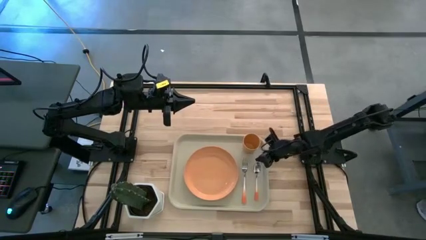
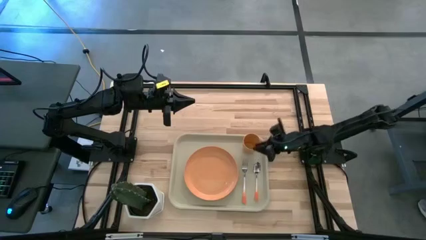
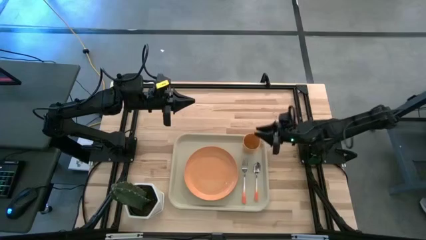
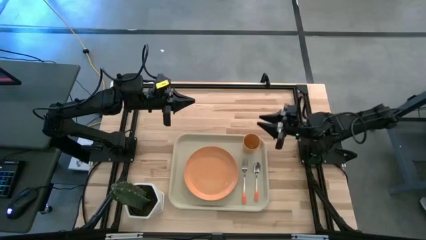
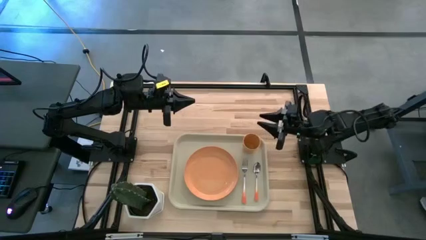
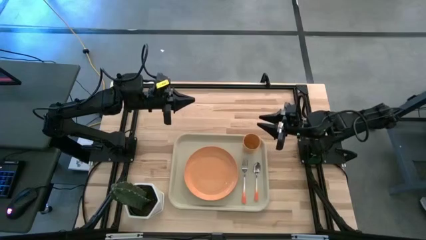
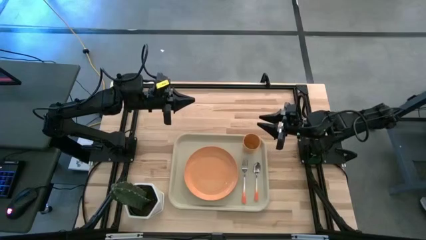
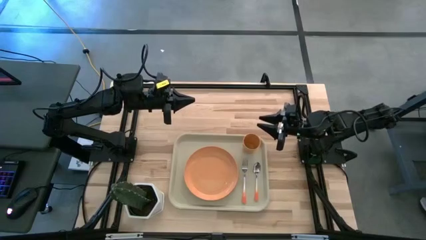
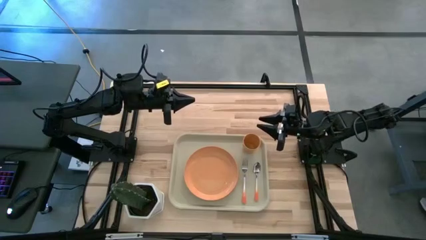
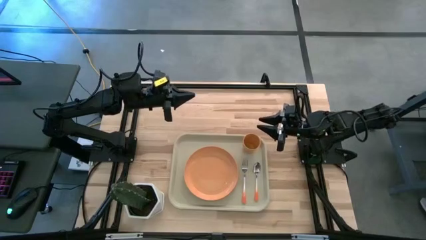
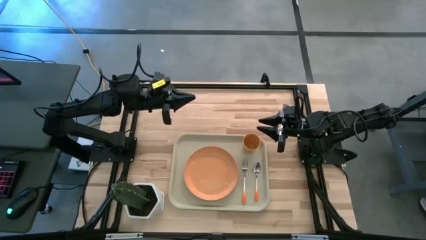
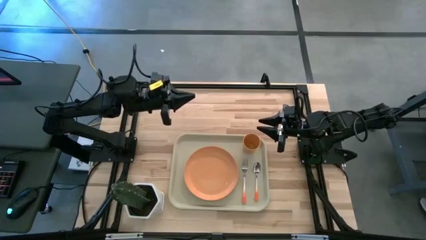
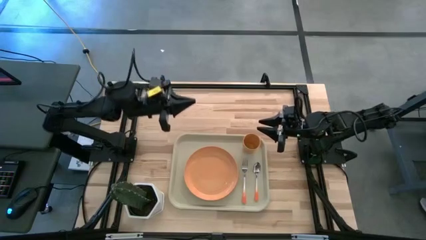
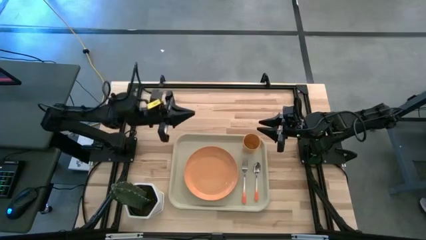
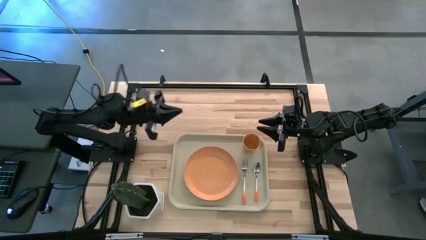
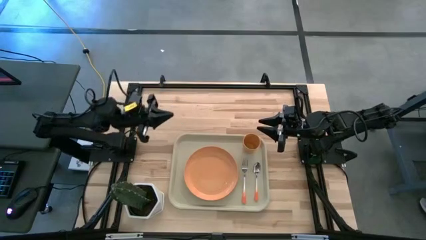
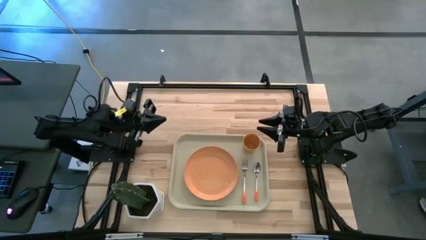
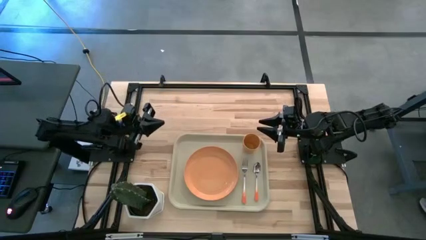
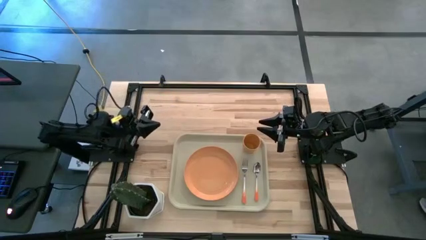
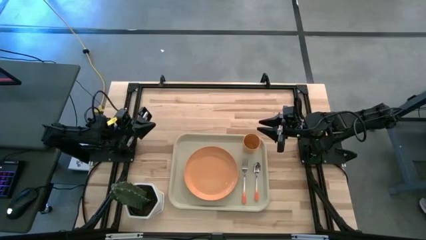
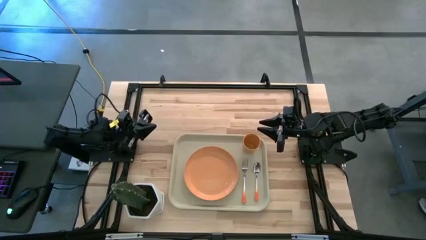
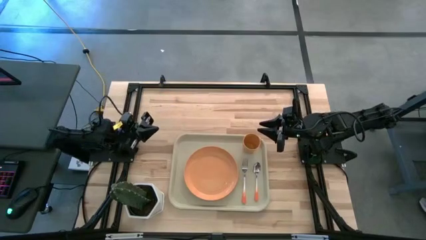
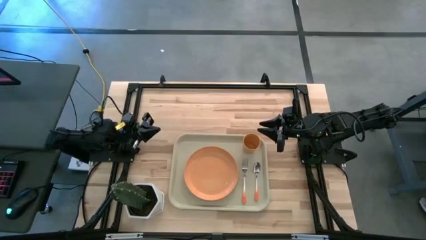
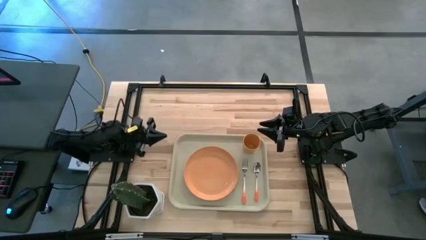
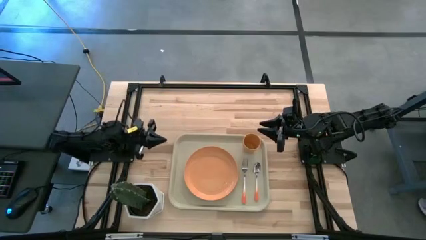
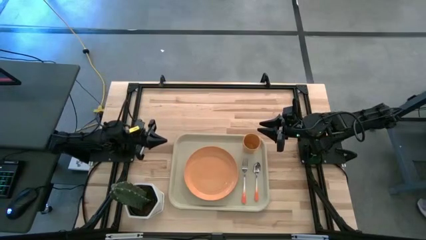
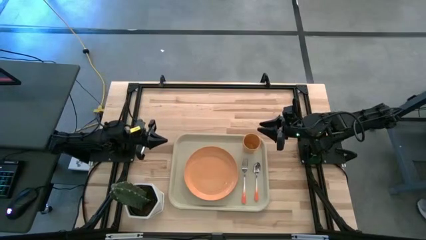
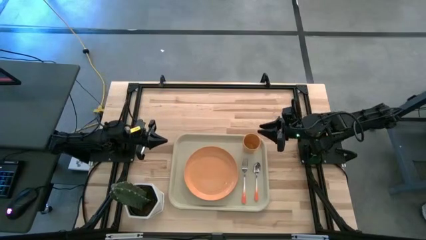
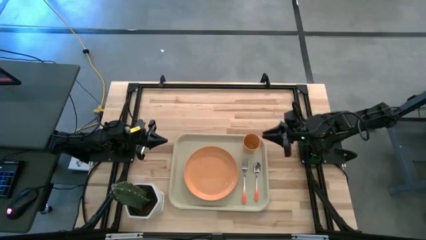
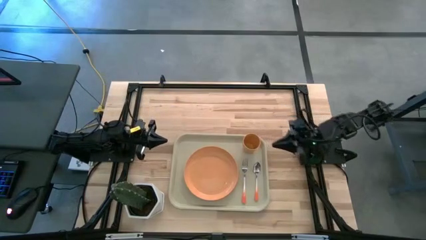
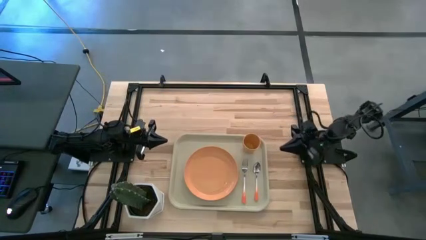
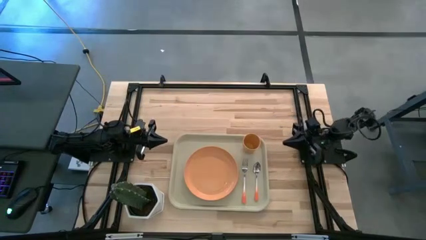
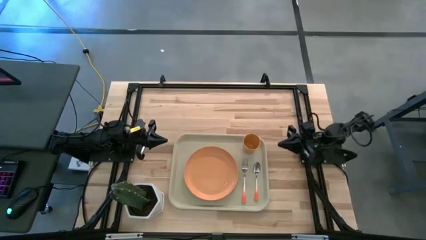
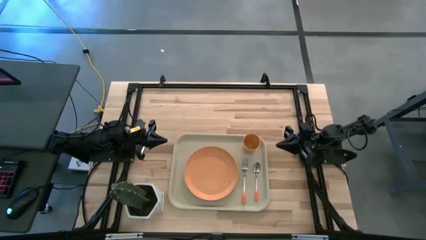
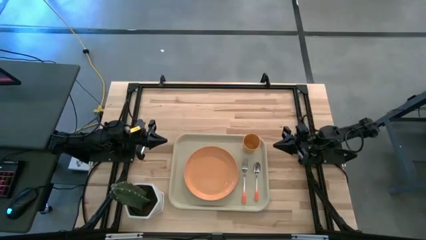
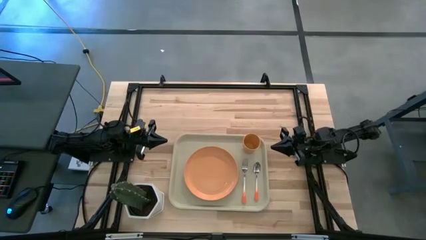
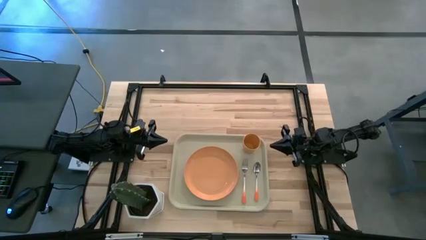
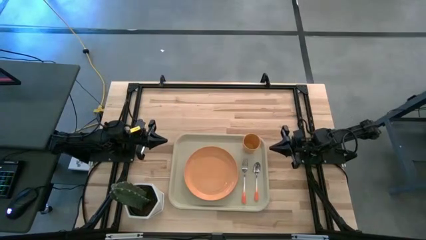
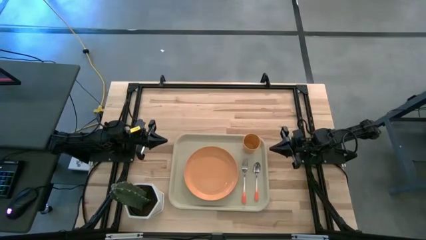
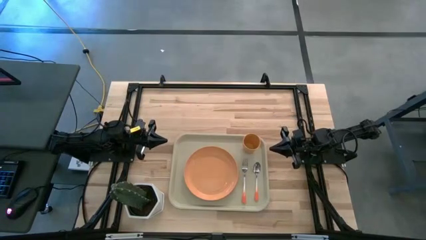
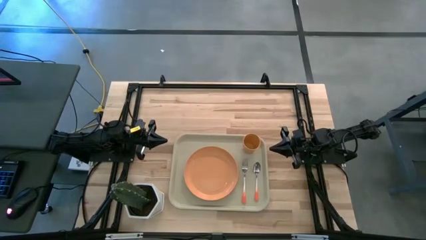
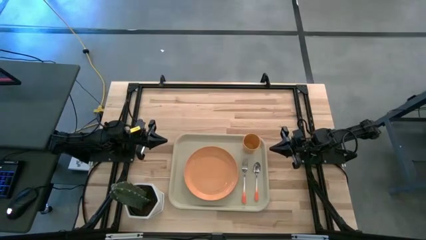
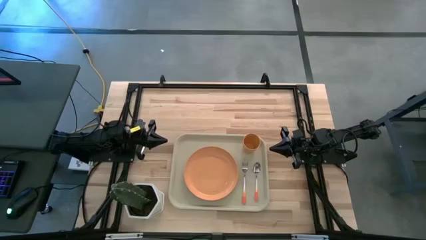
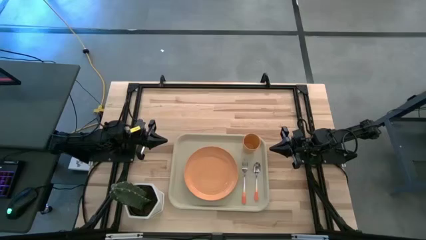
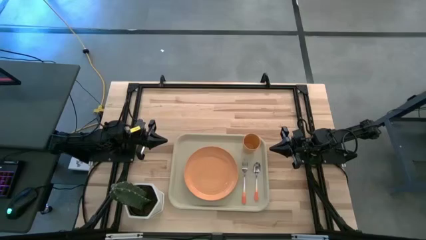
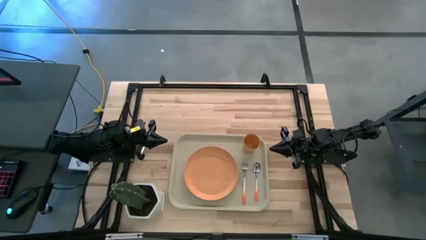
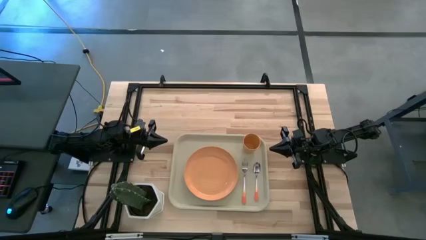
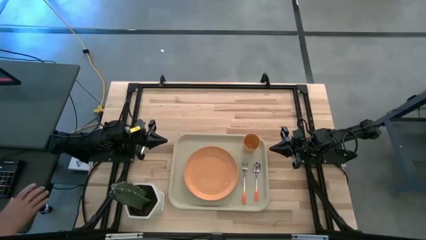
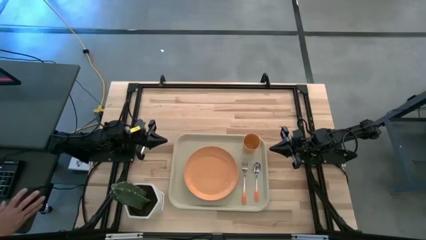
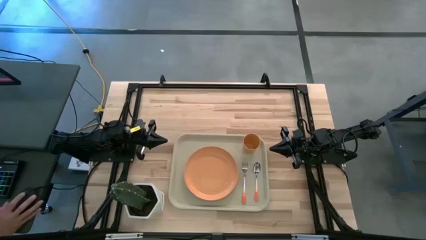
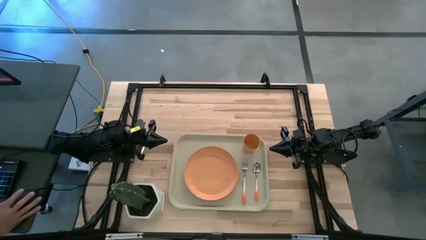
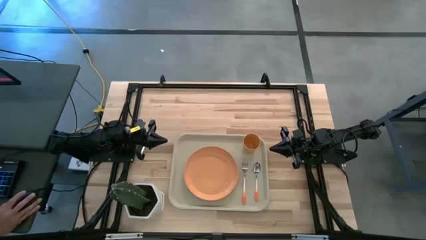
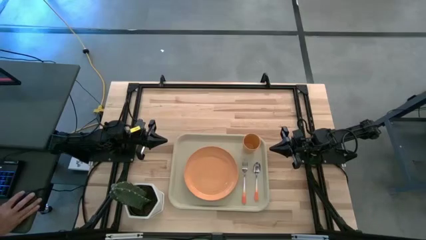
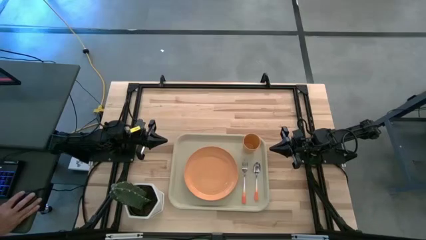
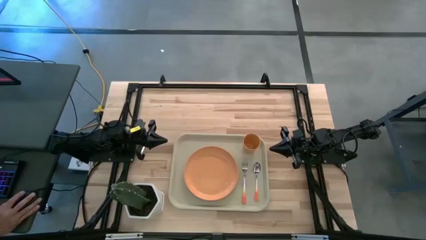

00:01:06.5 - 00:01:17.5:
Task: Pick and place plate/cup/fork/spoon on tray
Return to Home Position

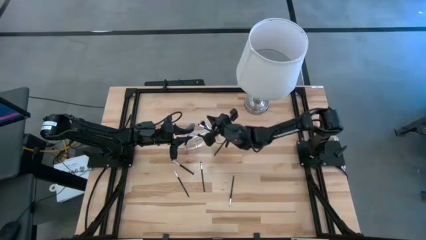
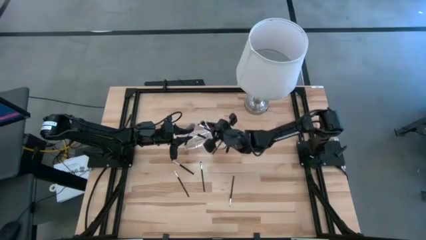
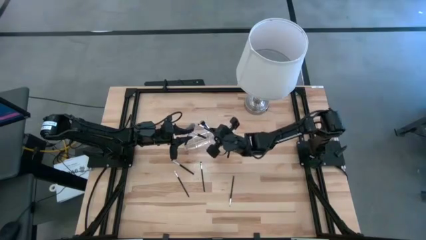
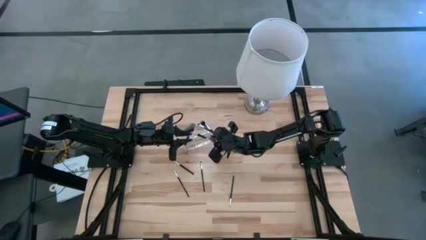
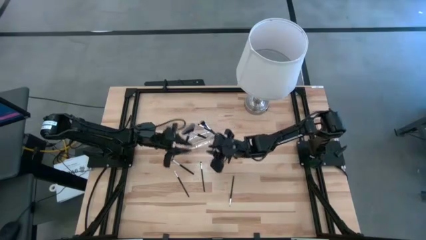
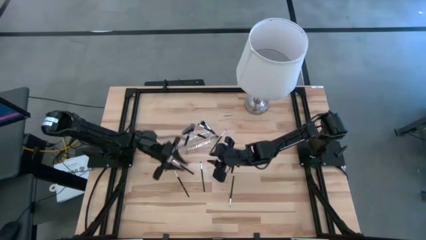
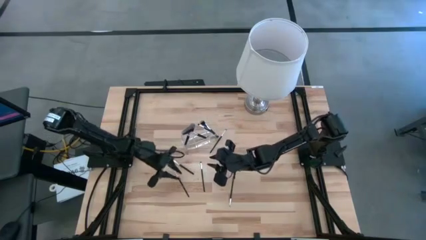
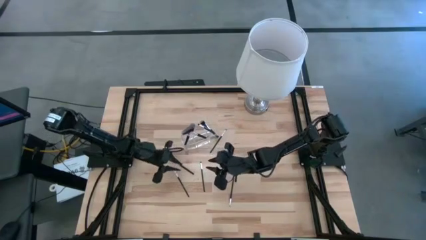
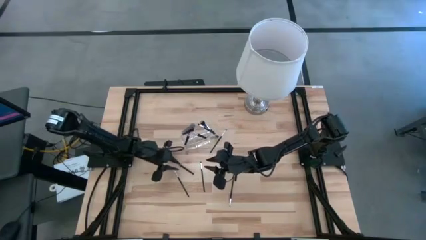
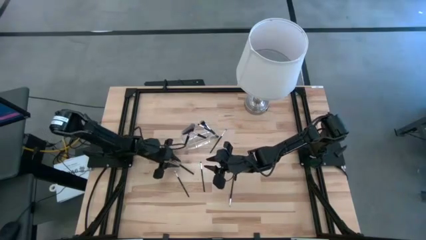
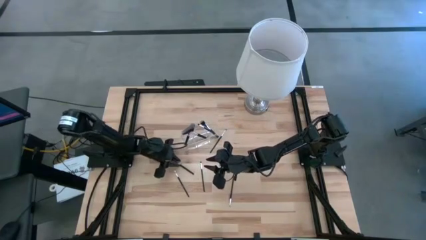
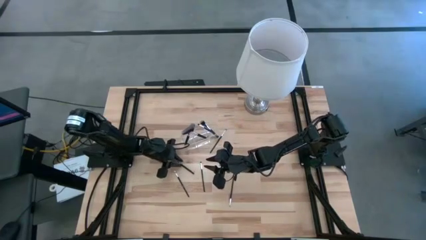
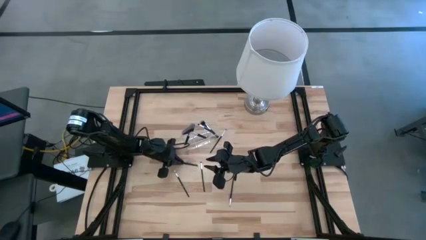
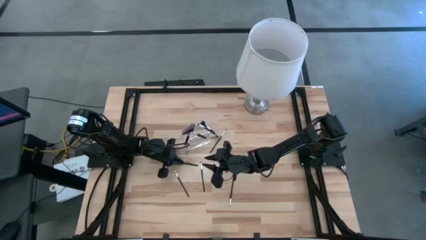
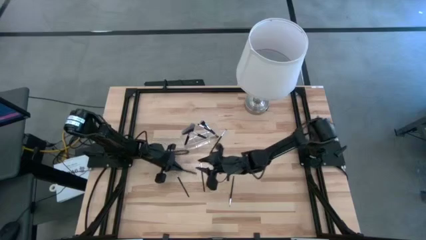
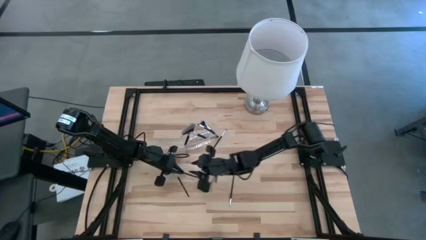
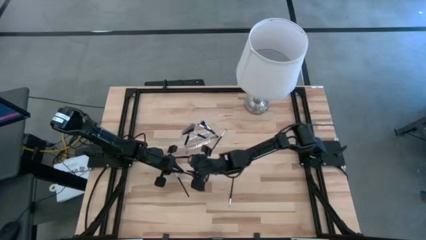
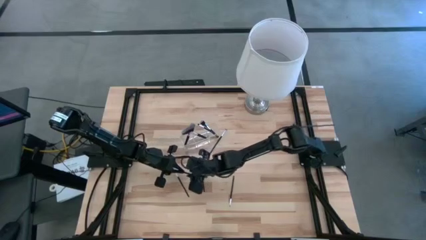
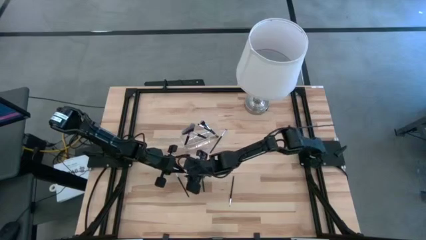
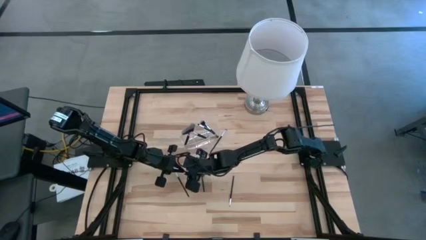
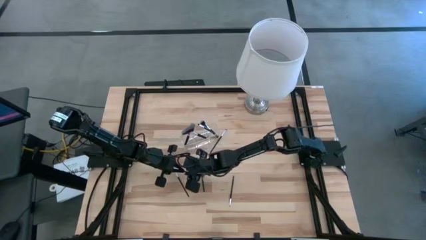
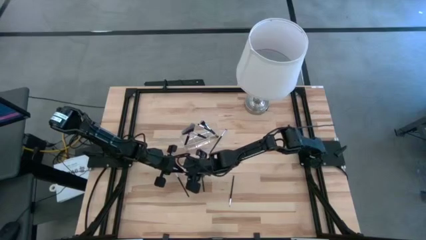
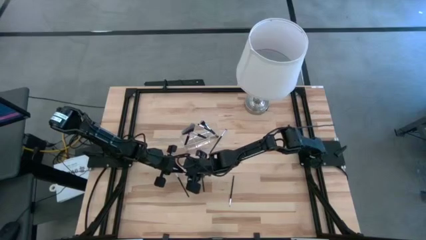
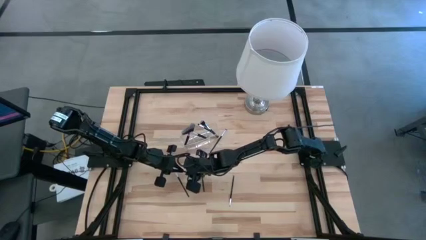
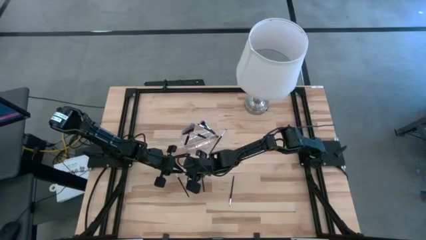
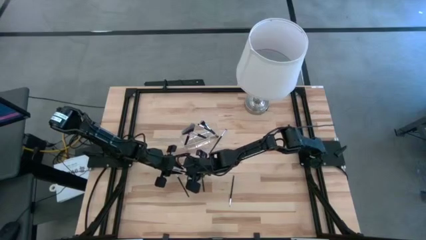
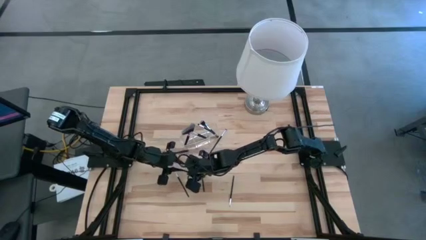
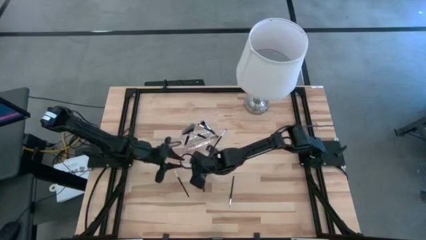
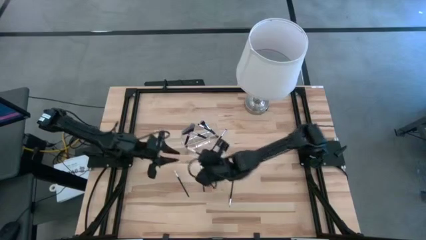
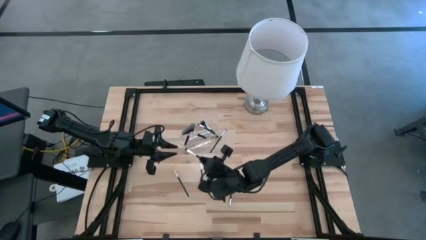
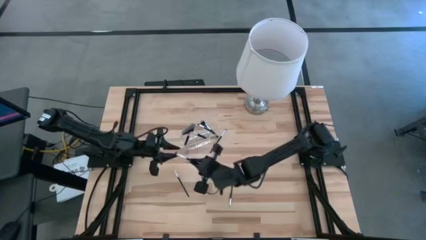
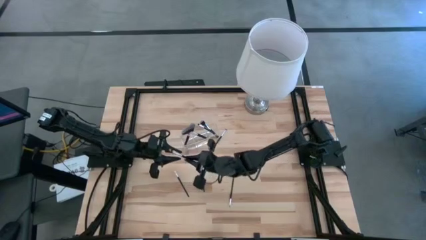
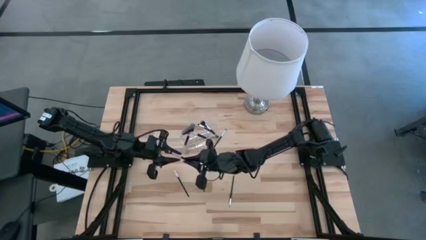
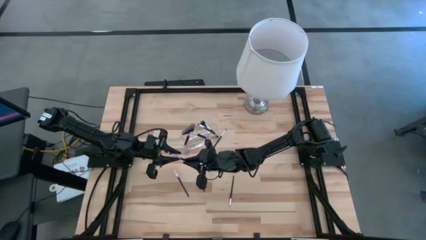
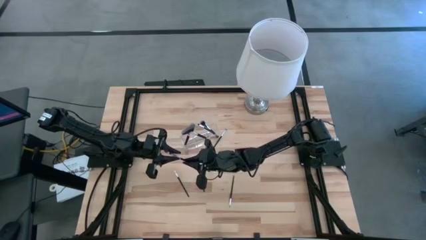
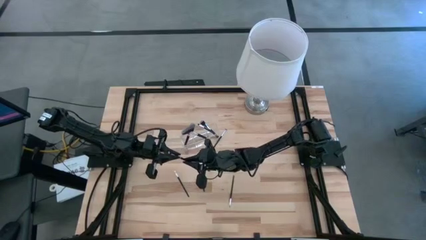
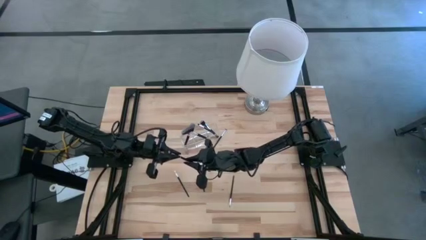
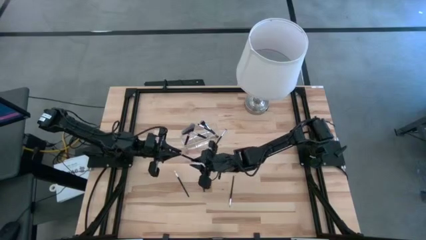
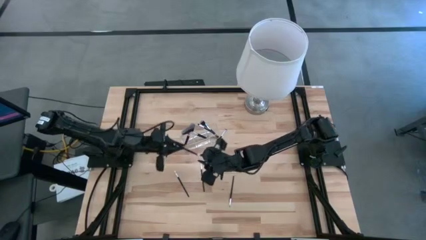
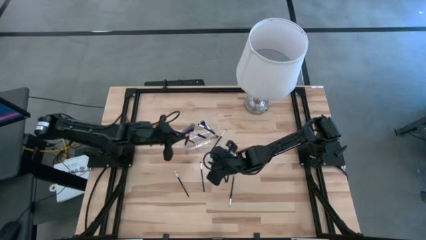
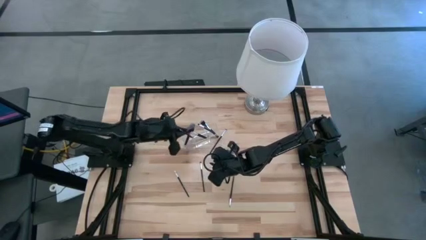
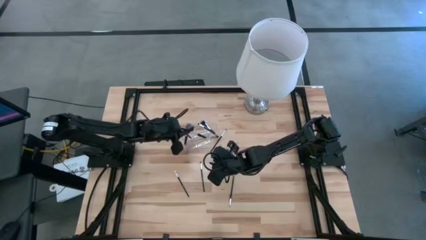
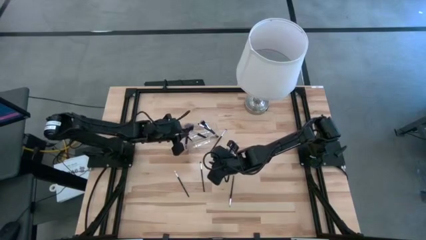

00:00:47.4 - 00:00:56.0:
Task: Put items in baskets/containers
Put the left foundation brush into the left transparent organizer
